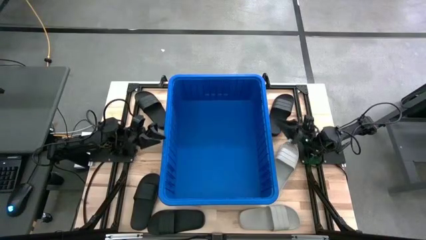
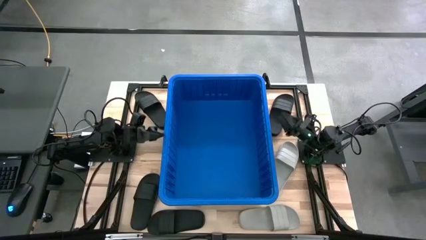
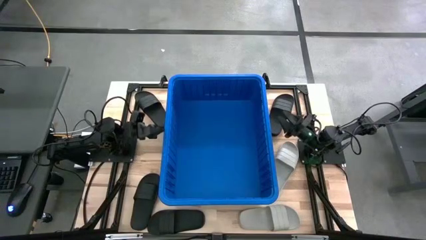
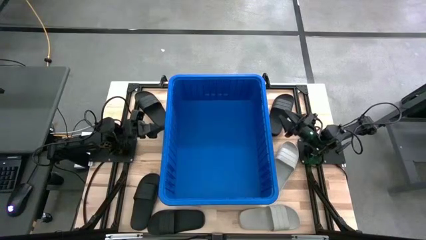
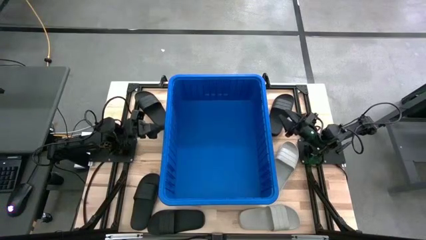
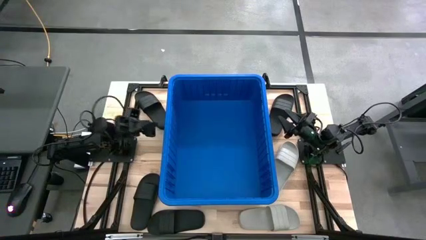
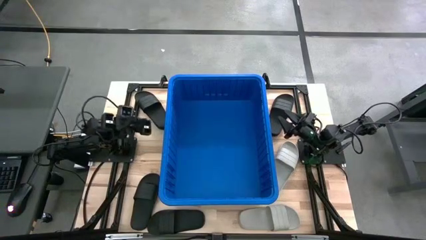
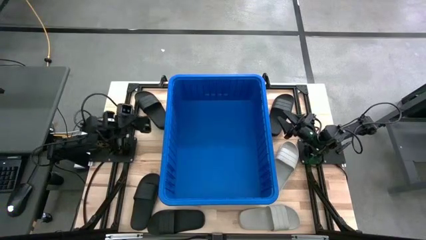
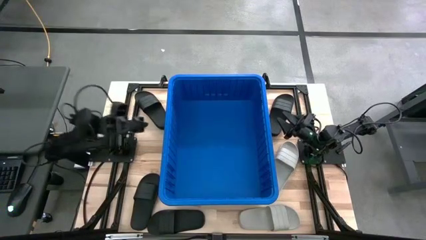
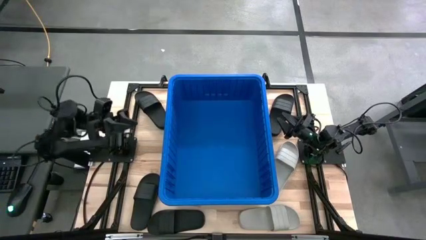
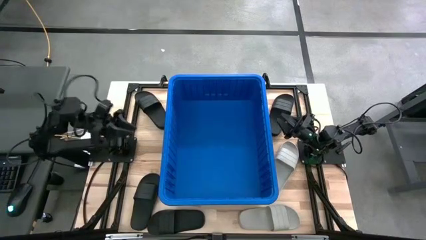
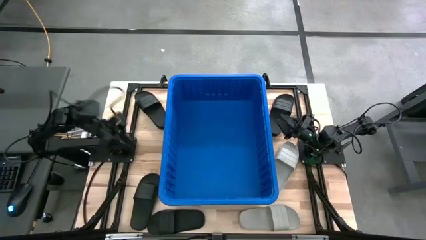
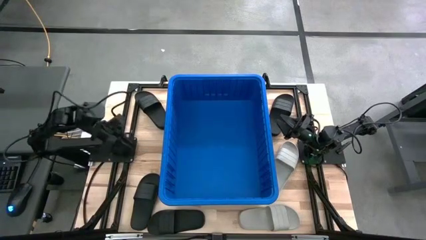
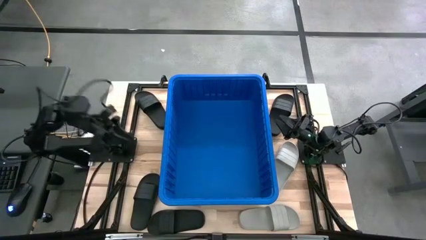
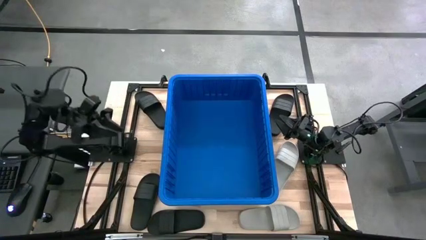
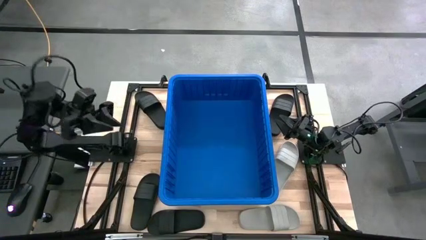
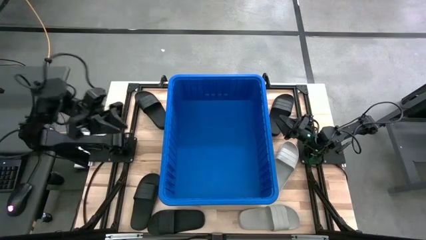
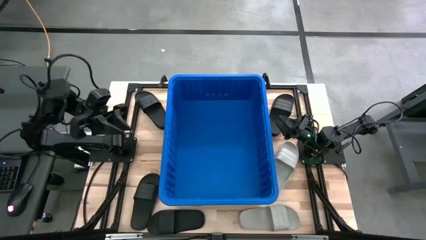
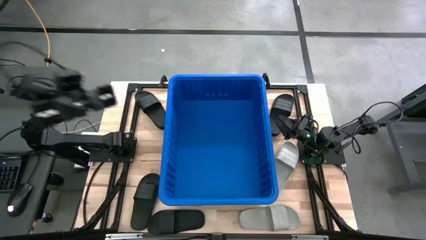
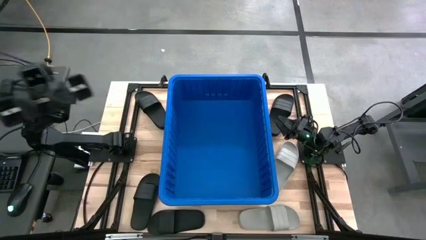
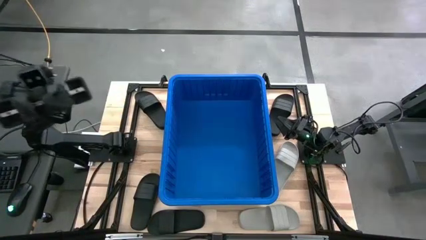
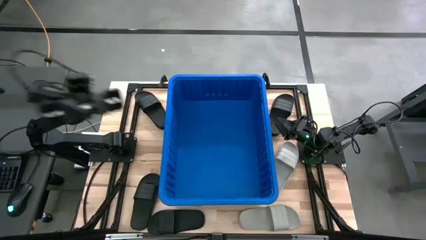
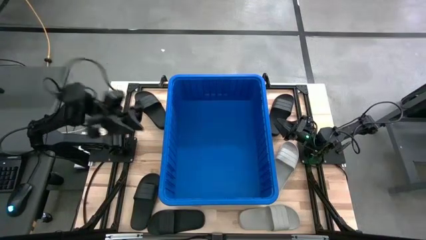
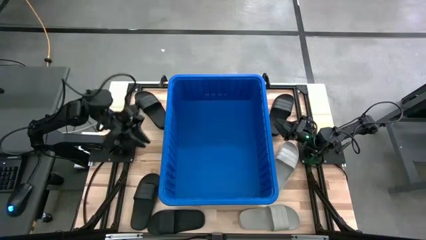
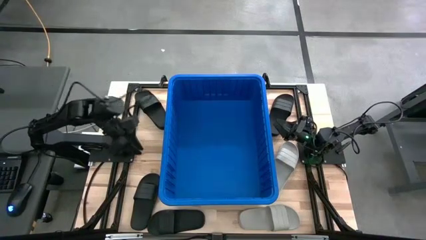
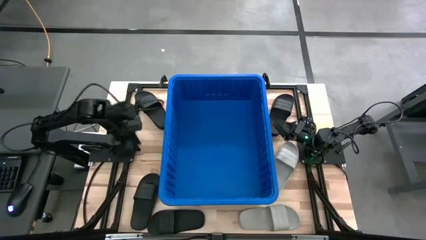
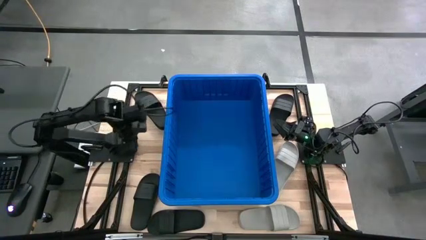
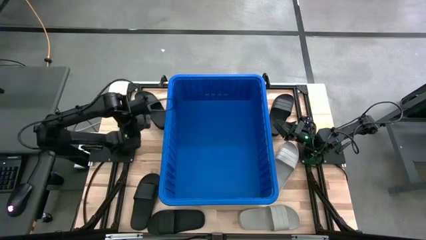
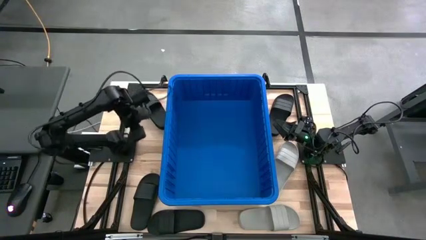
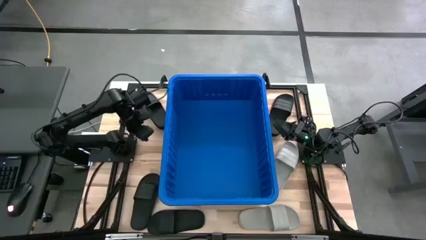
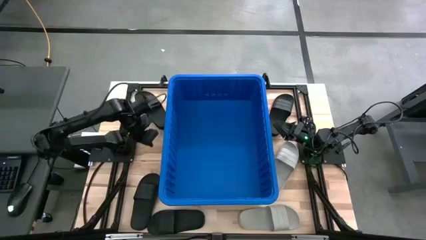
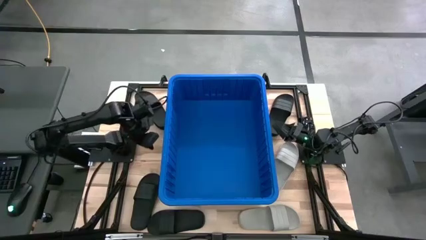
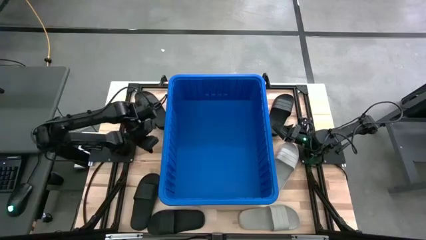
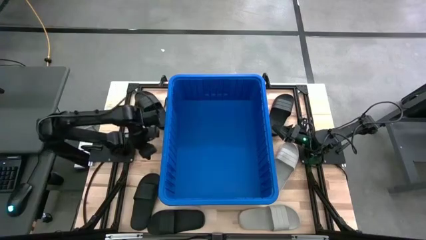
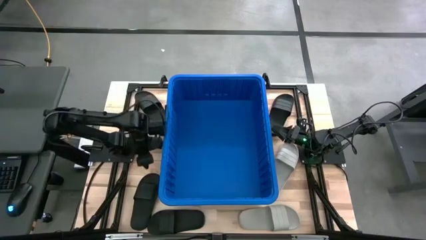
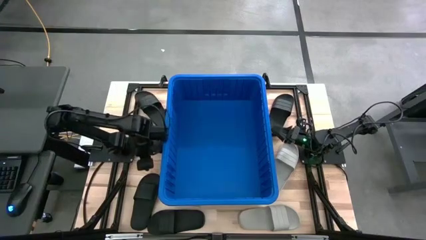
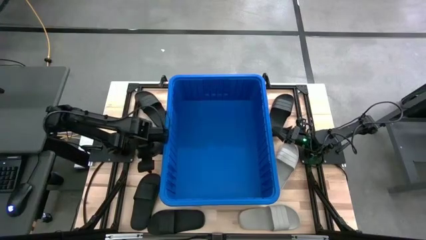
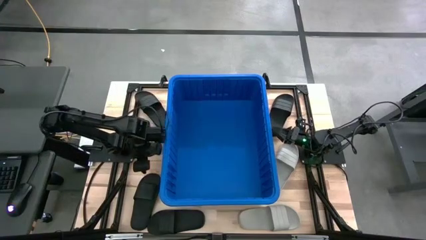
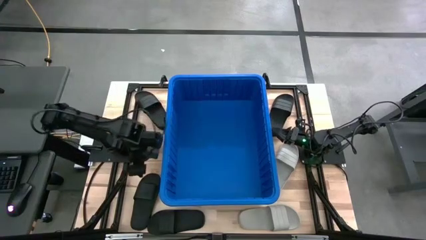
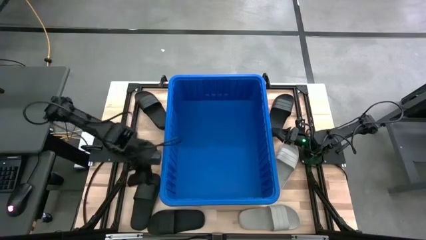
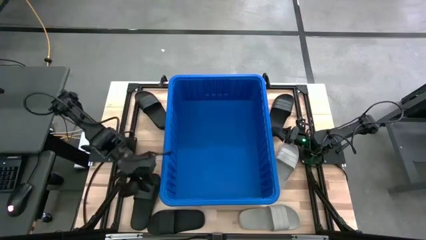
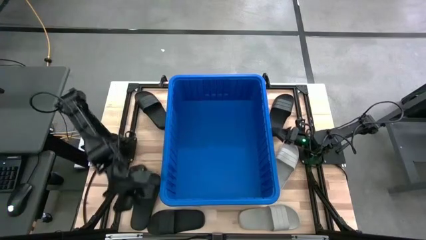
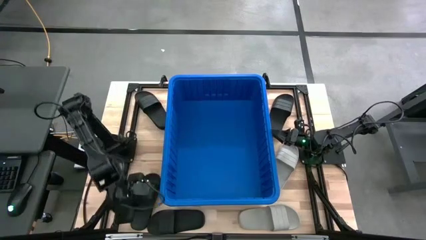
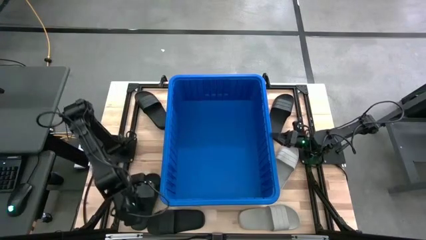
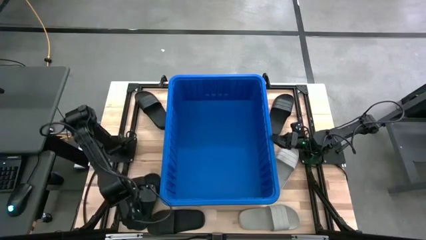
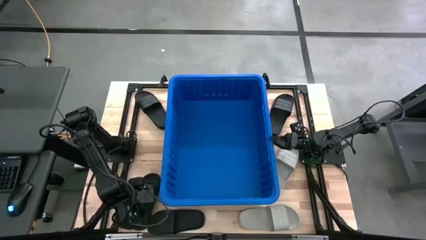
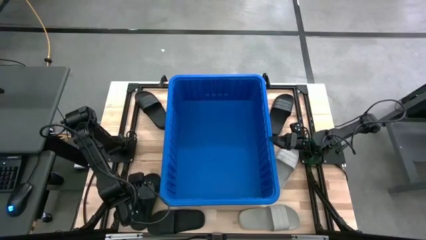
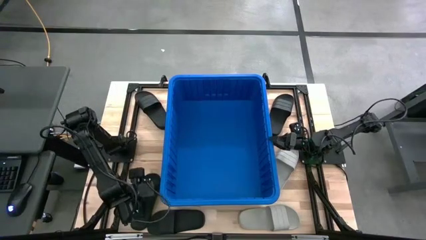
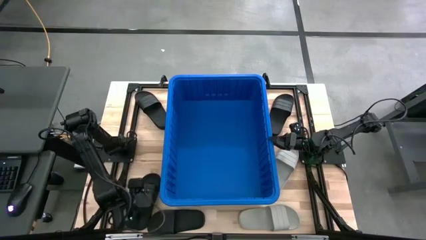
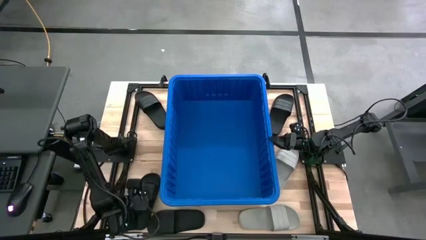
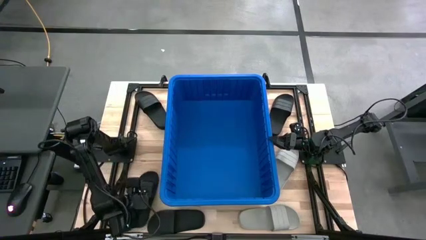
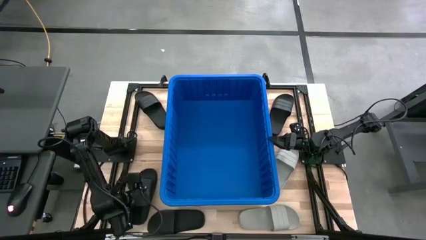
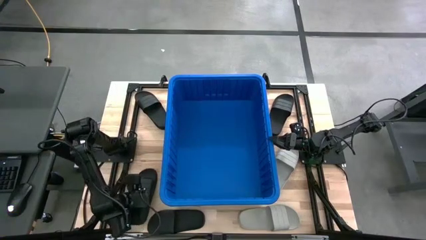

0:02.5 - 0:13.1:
Task: Pick and place slides into bin
Put the black slide into the blue bin
